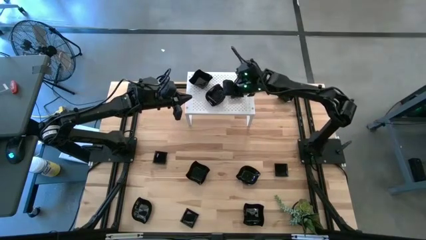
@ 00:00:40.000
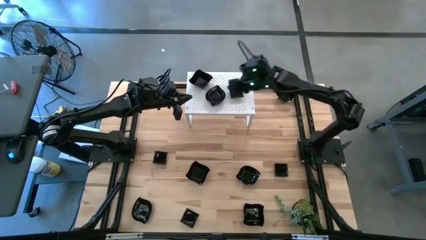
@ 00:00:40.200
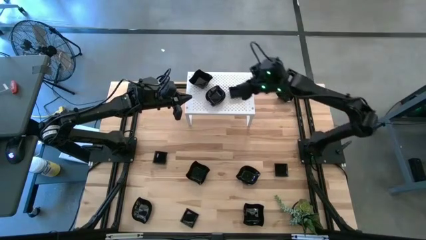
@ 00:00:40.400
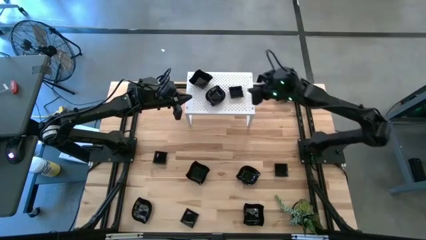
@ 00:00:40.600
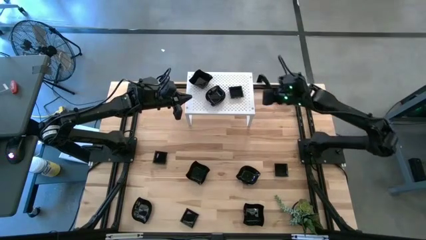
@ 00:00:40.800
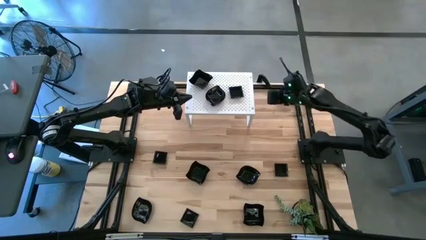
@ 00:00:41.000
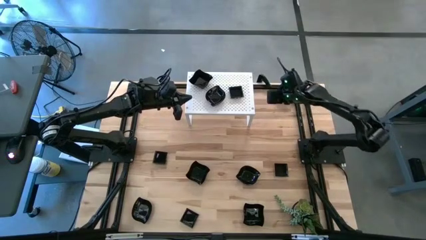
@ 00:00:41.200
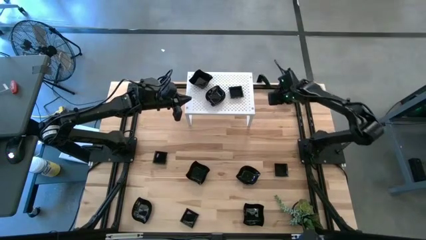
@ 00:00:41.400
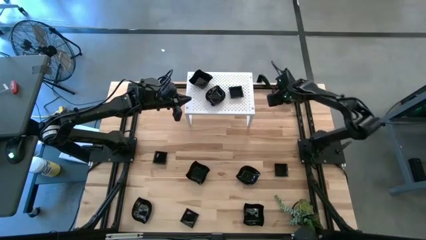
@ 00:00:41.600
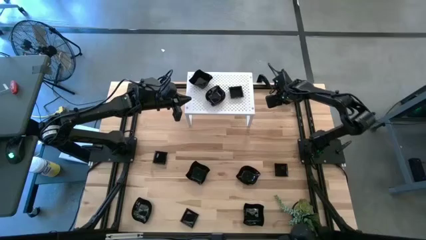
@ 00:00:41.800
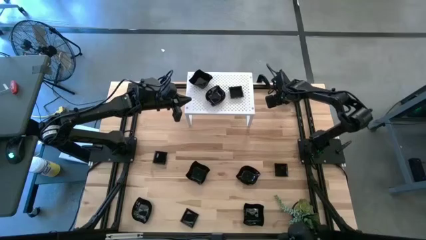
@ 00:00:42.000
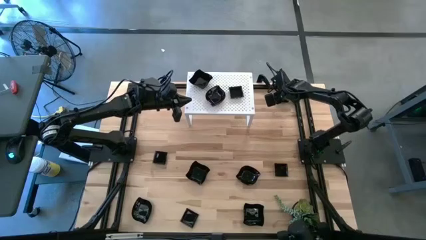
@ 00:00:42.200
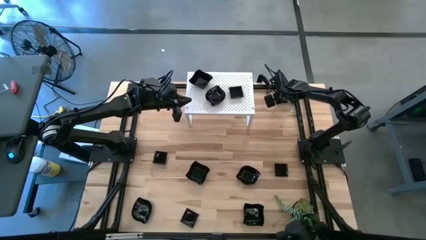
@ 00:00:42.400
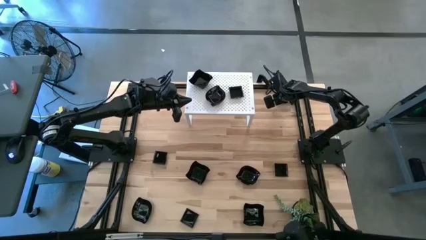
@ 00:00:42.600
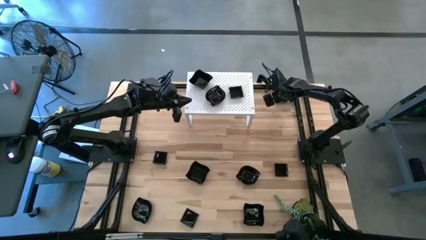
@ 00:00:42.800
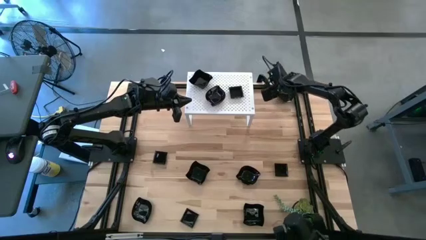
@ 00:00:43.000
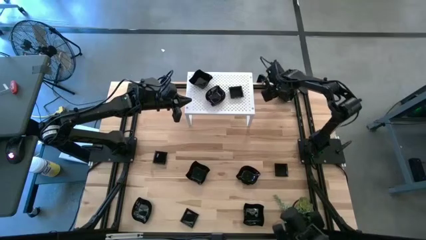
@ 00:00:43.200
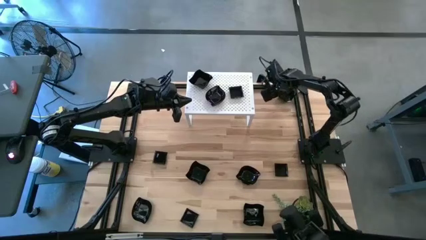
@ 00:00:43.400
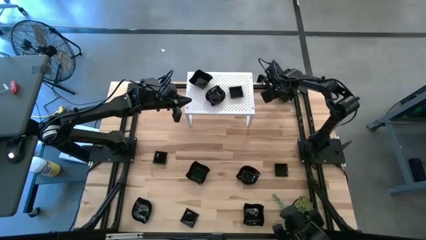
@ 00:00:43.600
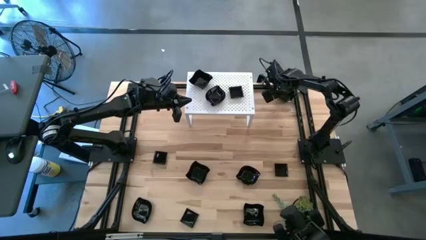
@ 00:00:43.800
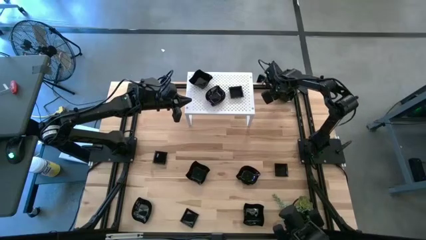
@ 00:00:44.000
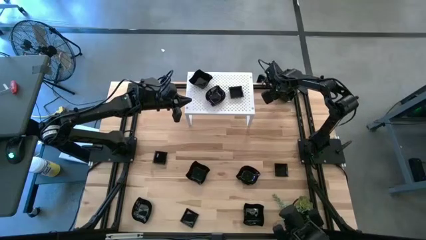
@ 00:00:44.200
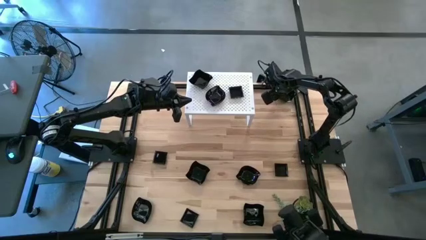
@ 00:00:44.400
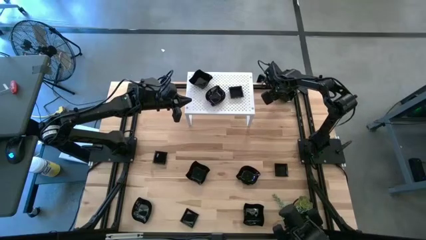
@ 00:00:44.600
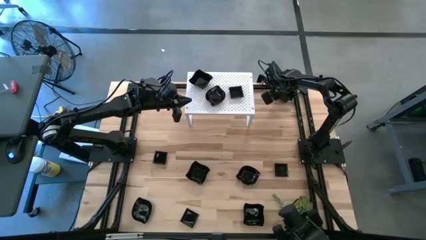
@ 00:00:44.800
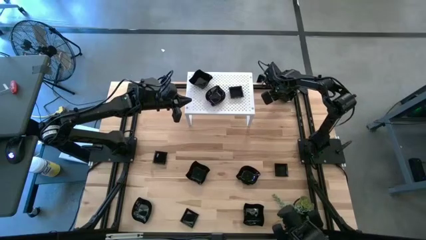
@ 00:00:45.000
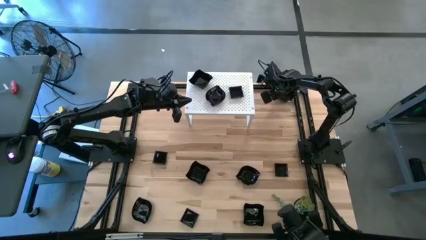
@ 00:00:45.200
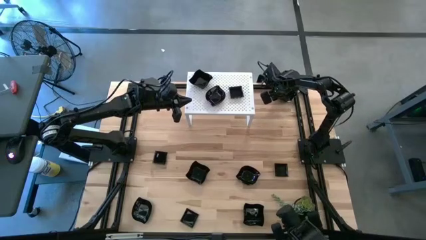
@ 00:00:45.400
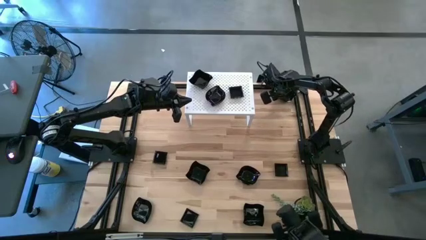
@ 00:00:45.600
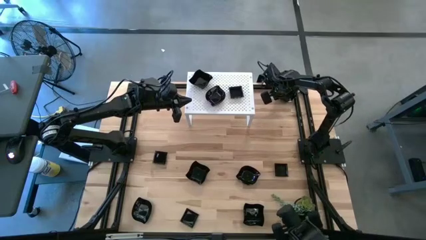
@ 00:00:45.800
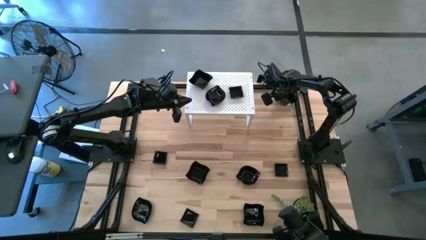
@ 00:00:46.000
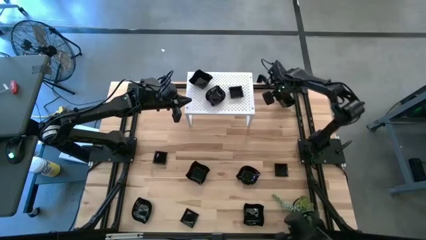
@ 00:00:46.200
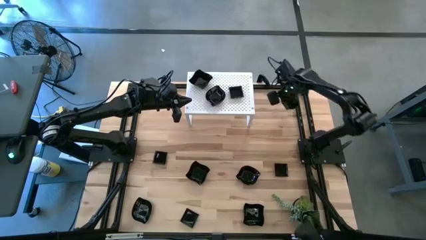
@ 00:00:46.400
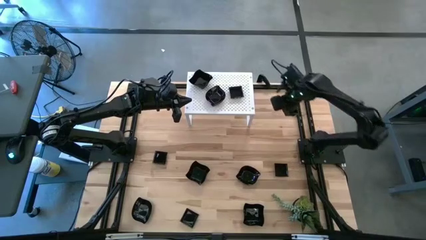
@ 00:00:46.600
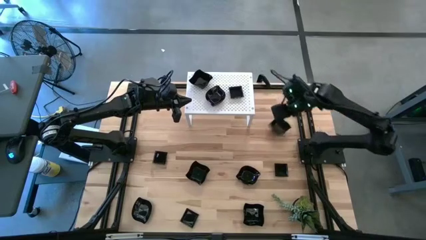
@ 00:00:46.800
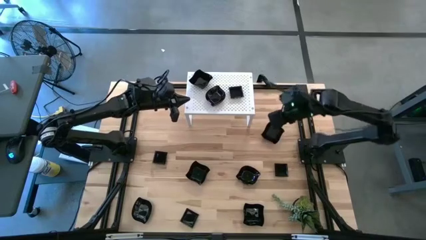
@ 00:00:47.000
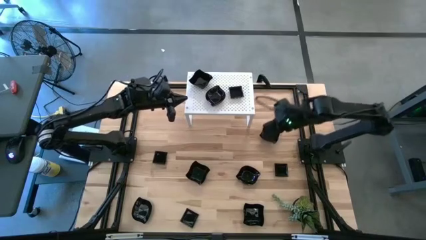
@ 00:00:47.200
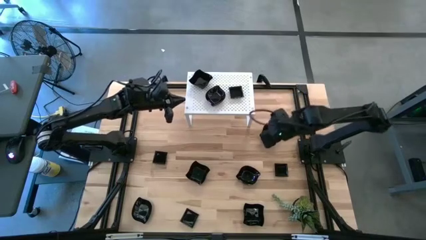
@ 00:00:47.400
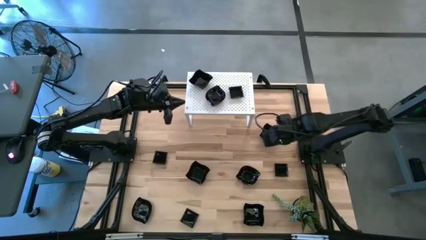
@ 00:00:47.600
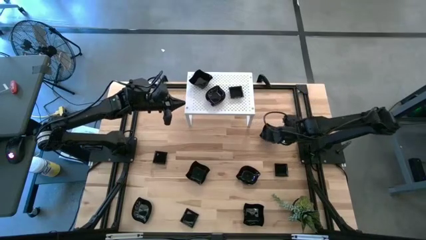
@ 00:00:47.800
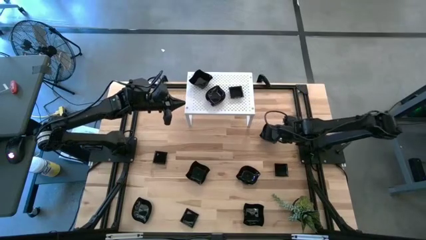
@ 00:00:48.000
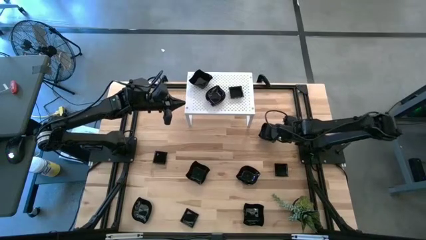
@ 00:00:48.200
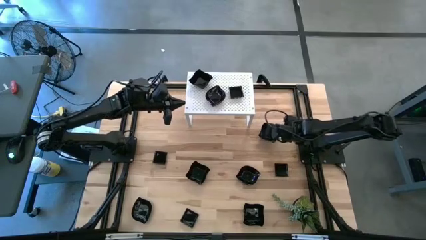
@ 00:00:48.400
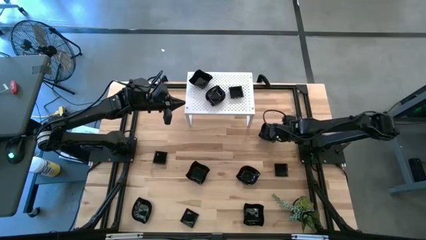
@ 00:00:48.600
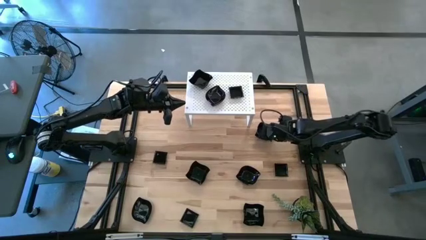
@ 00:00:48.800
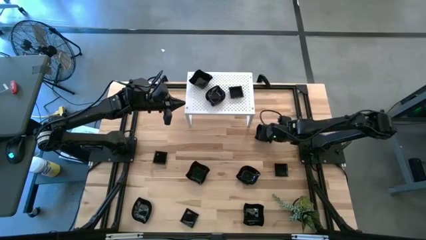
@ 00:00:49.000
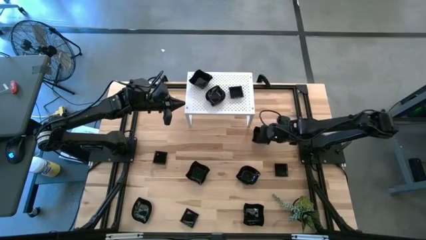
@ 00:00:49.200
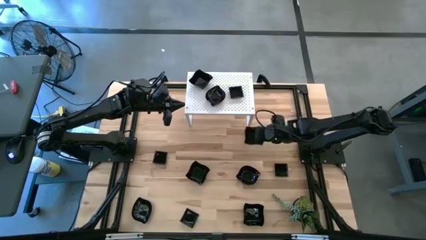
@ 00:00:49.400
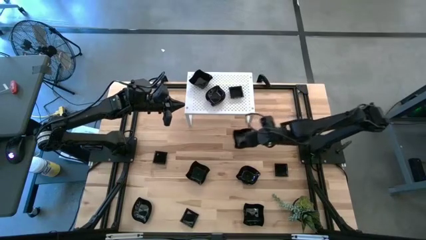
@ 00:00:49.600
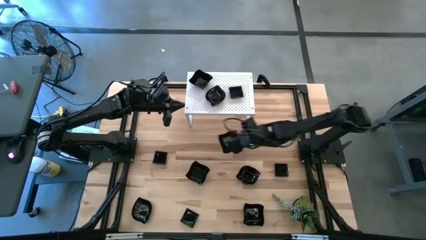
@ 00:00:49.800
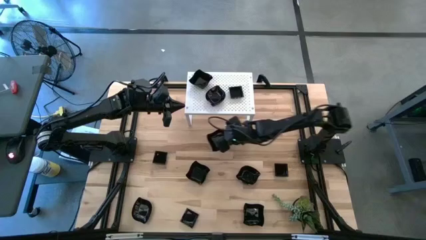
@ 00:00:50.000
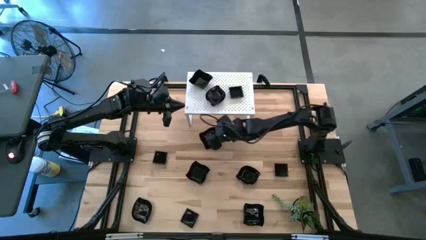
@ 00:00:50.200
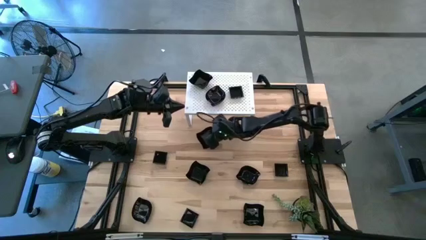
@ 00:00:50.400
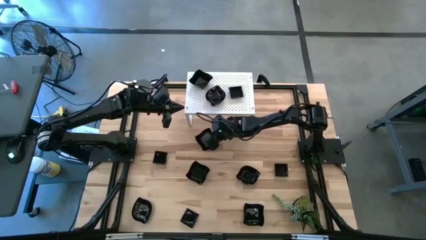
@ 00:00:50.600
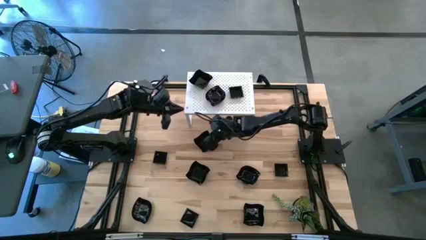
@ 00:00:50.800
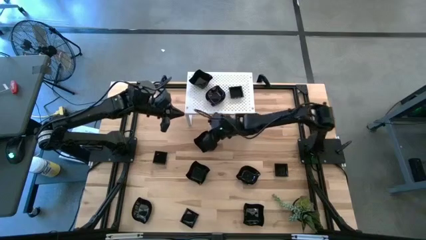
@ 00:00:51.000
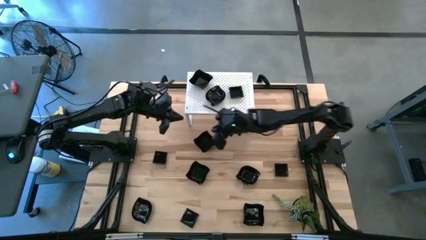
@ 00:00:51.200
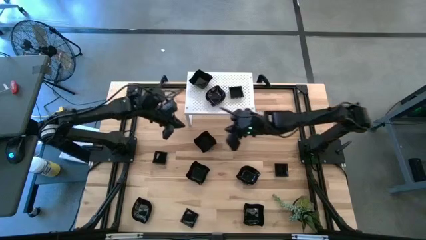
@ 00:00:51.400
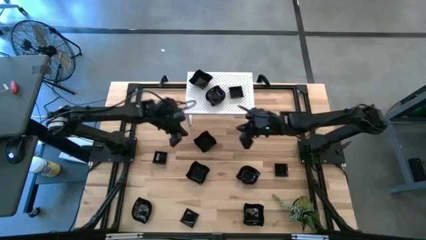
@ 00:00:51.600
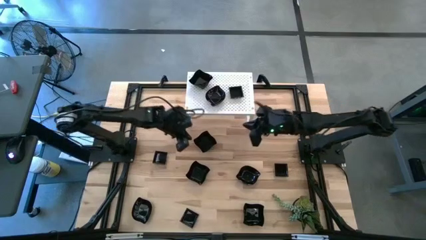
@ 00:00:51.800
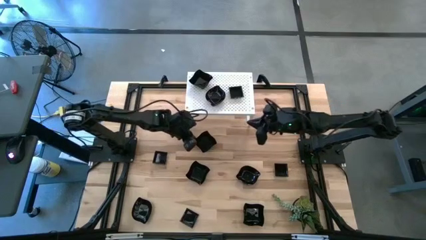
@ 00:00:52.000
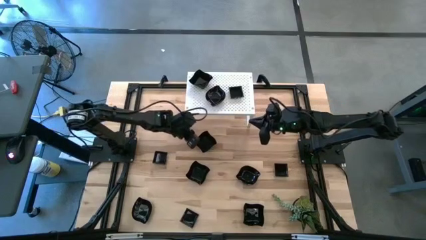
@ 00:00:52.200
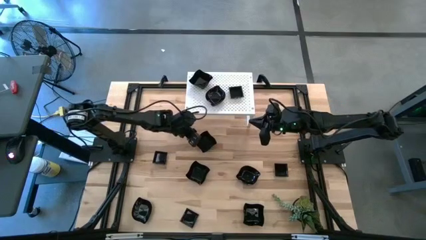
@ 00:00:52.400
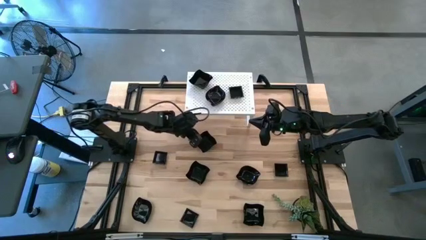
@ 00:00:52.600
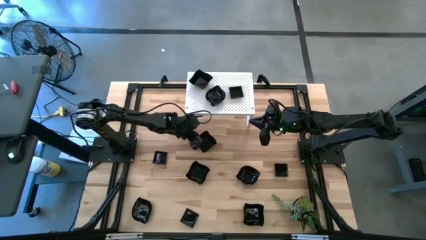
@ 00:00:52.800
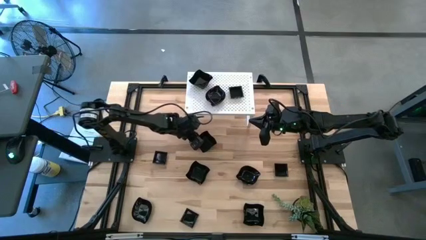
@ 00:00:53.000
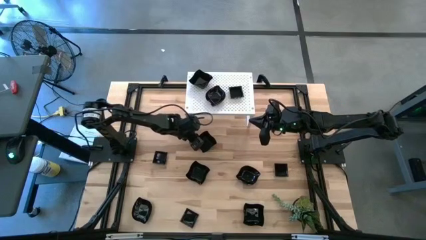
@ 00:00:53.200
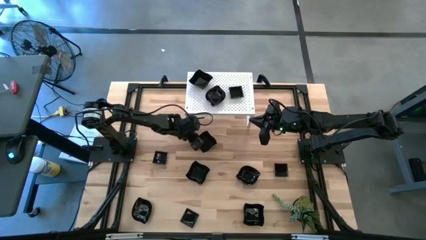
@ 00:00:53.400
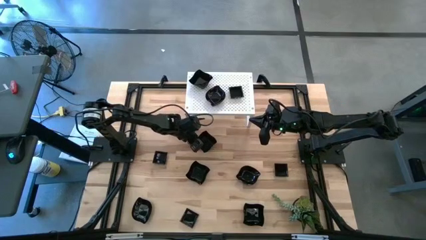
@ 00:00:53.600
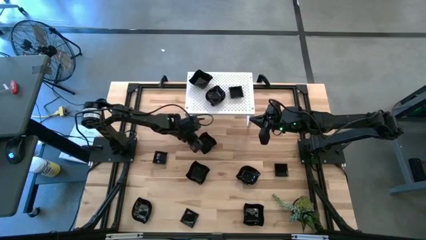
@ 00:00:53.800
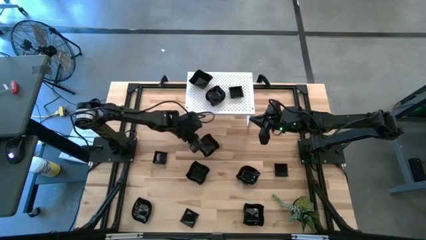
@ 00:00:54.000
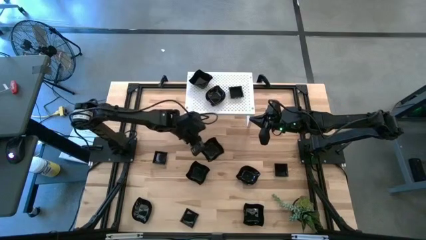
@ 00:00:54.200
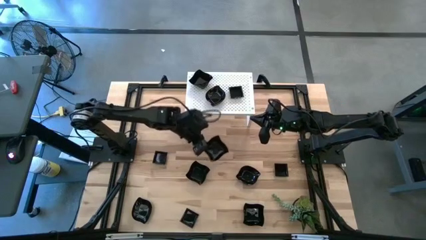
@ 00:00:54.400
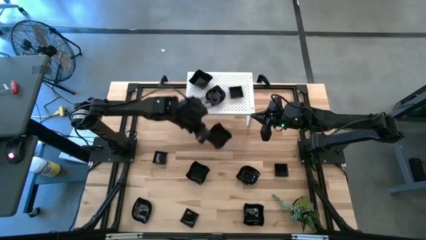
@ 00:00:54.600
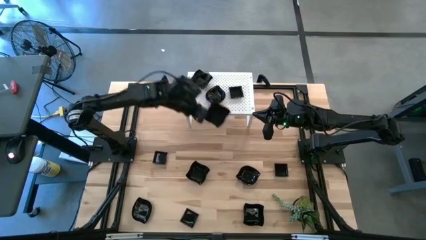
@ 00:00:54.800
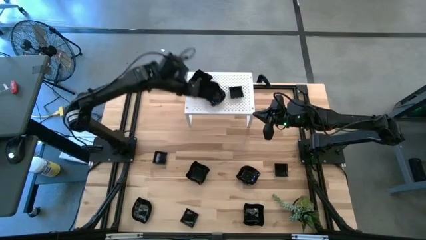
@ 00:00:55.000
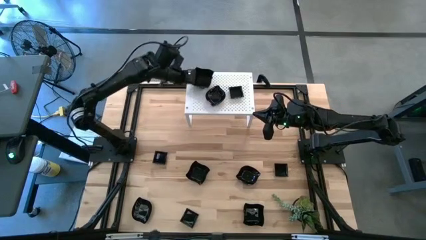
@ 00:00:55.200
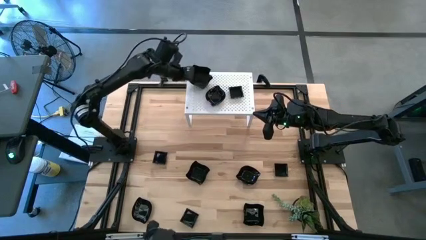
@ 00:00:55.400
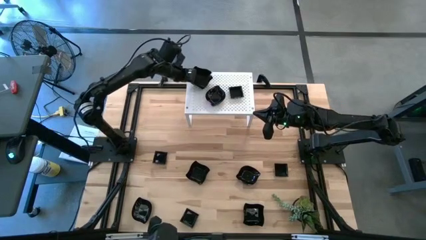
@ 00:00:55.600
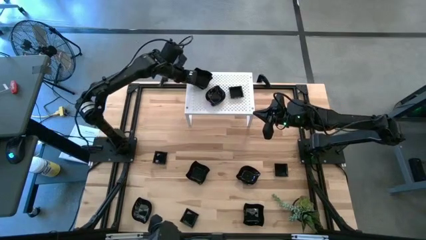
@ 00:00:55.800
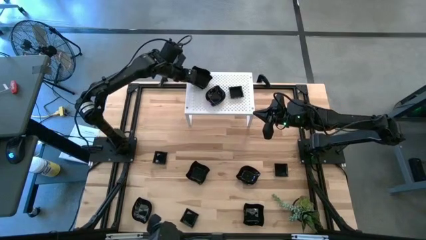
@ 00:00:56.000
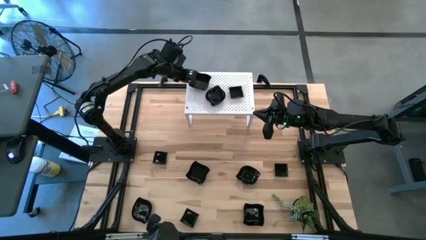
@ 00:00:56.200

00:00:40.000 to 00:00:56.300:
Task: Pick & Place Mini shaped plates
Stack the black distorted square plate on top of the black distorted square plate on the shelf
